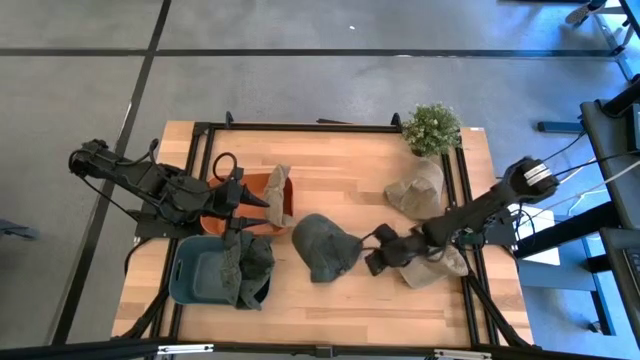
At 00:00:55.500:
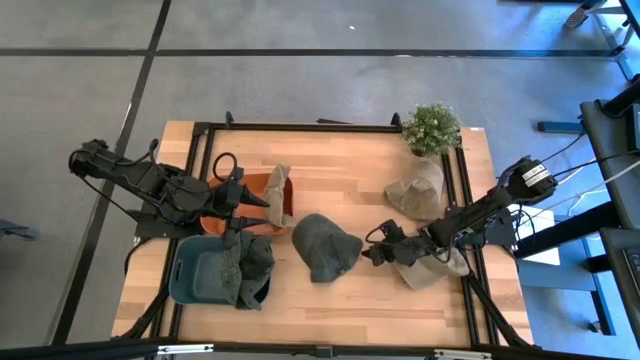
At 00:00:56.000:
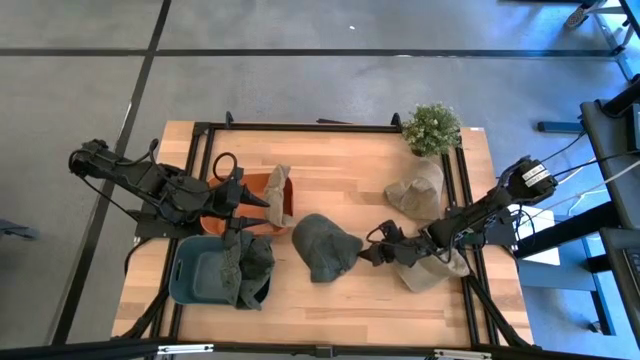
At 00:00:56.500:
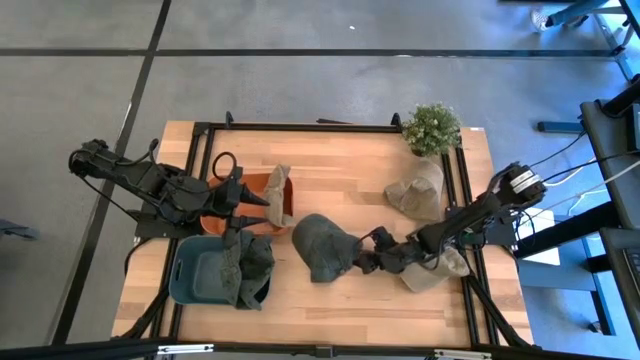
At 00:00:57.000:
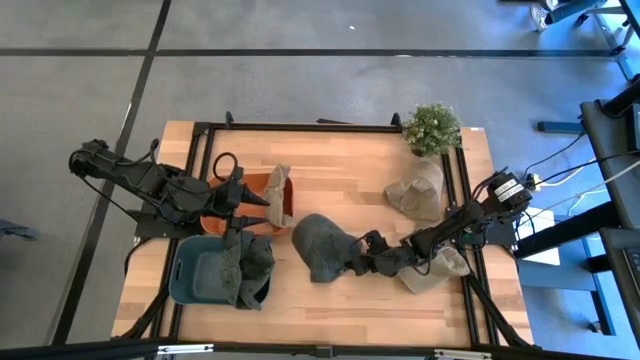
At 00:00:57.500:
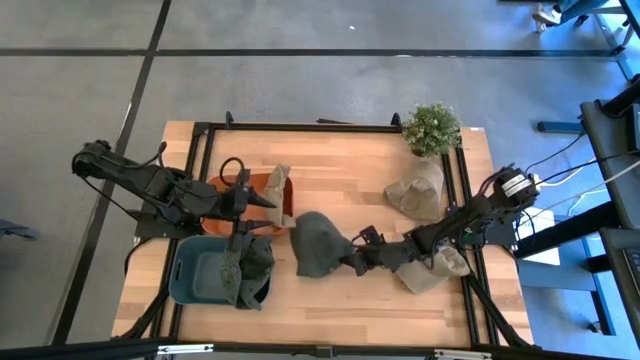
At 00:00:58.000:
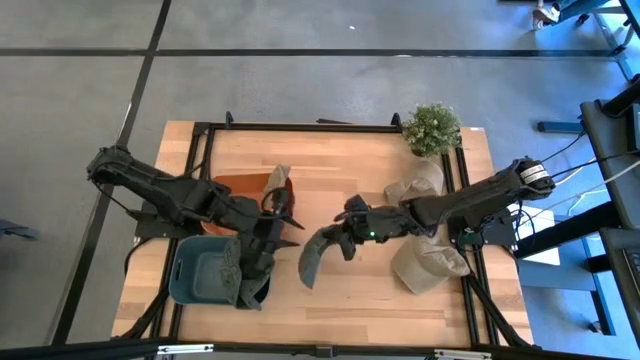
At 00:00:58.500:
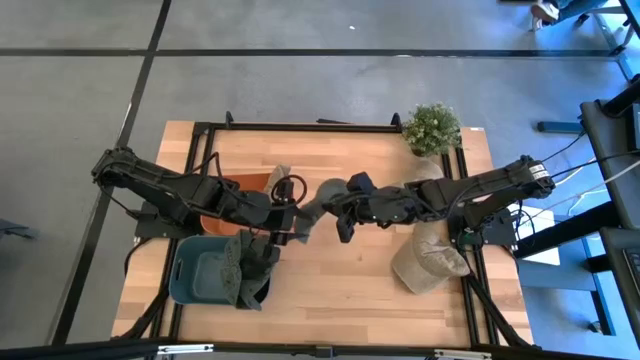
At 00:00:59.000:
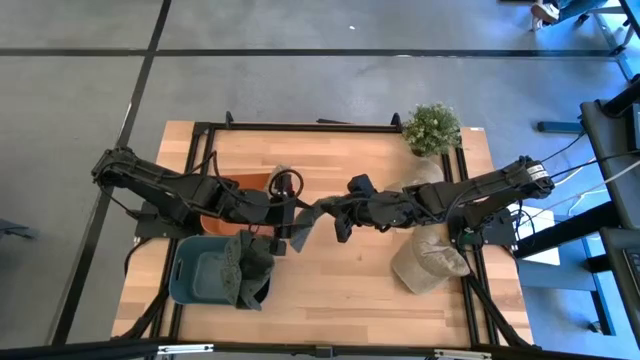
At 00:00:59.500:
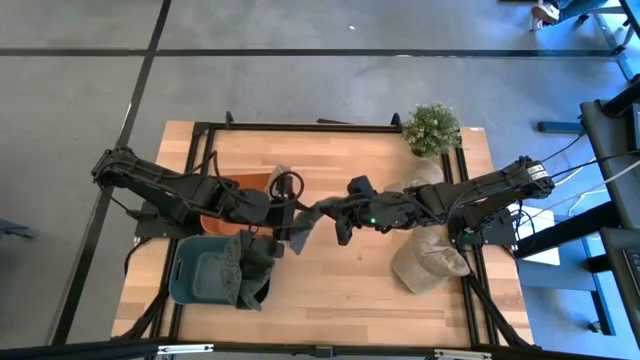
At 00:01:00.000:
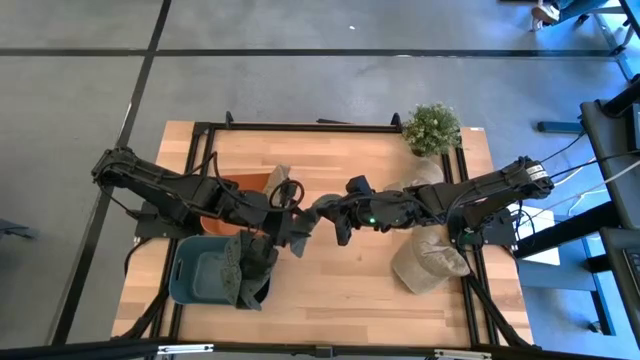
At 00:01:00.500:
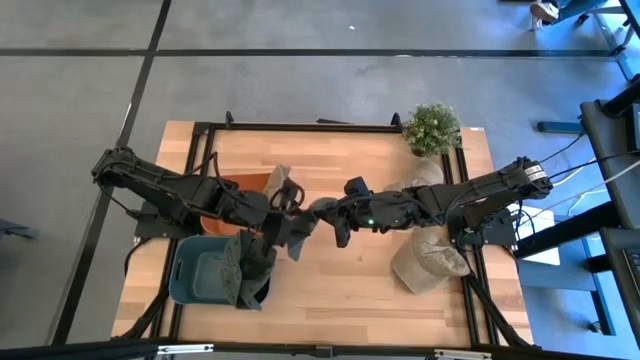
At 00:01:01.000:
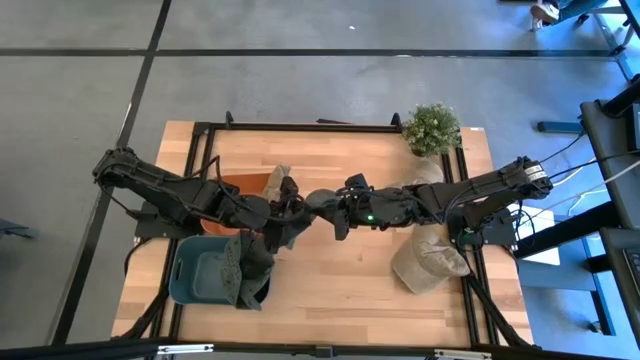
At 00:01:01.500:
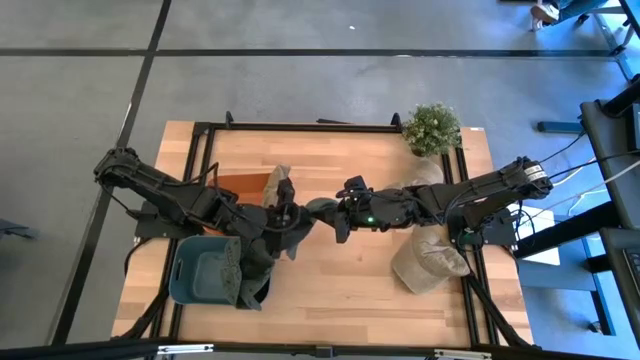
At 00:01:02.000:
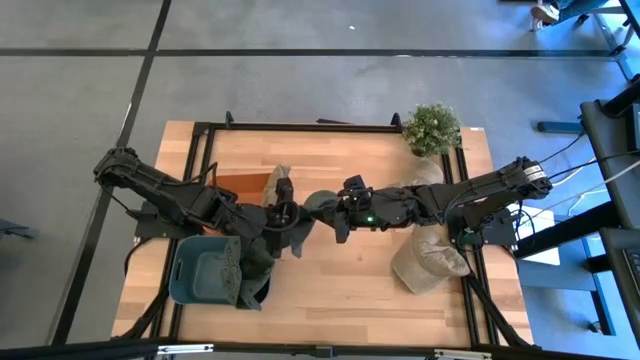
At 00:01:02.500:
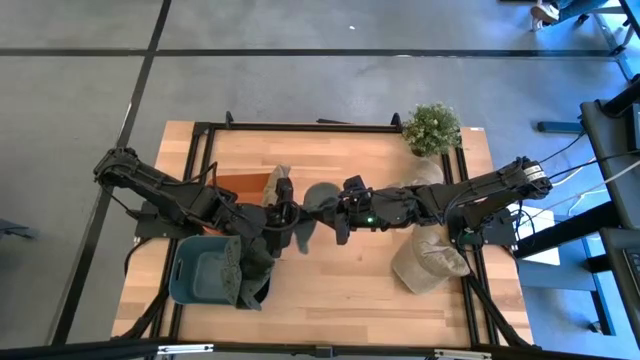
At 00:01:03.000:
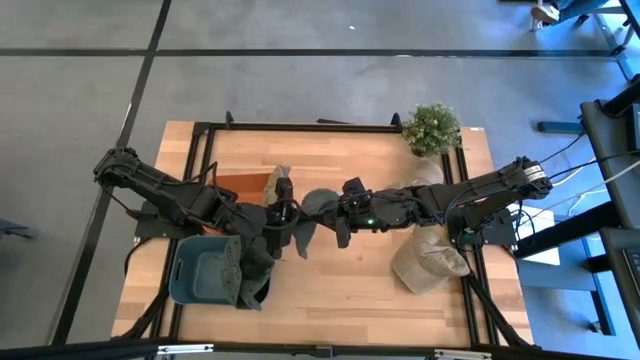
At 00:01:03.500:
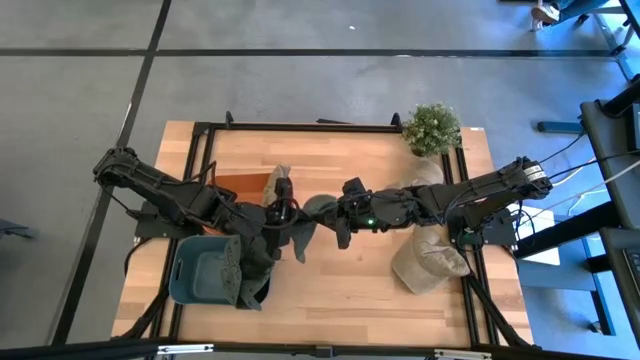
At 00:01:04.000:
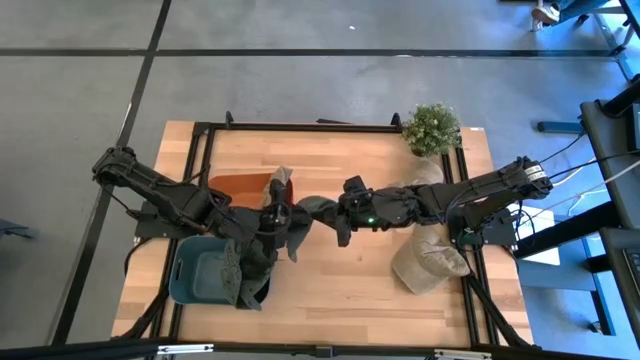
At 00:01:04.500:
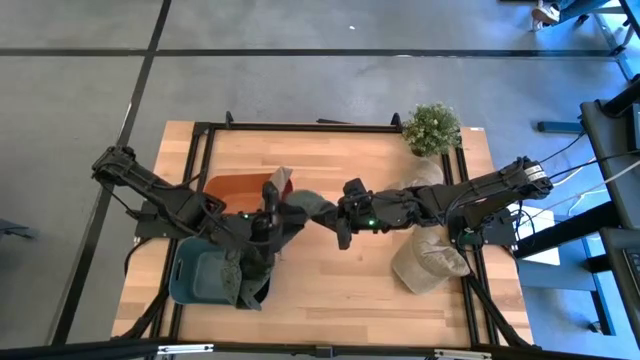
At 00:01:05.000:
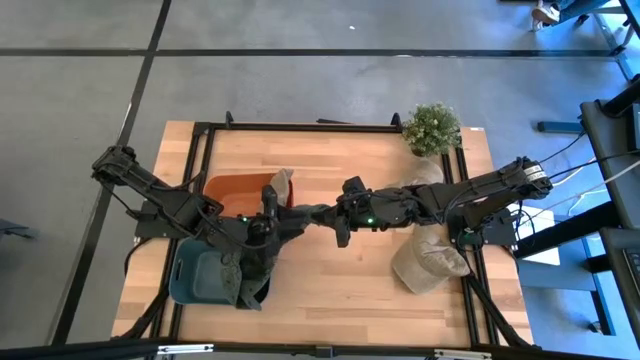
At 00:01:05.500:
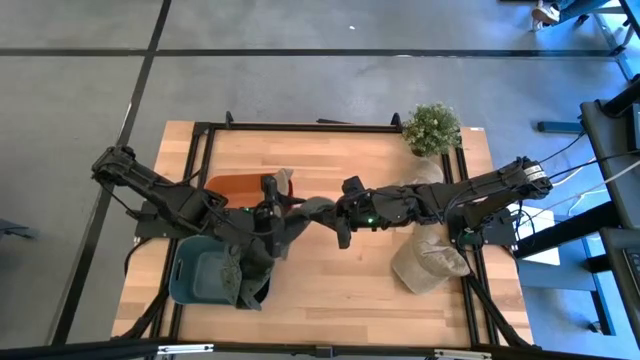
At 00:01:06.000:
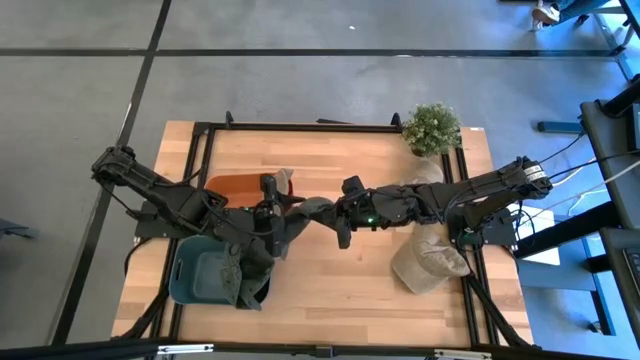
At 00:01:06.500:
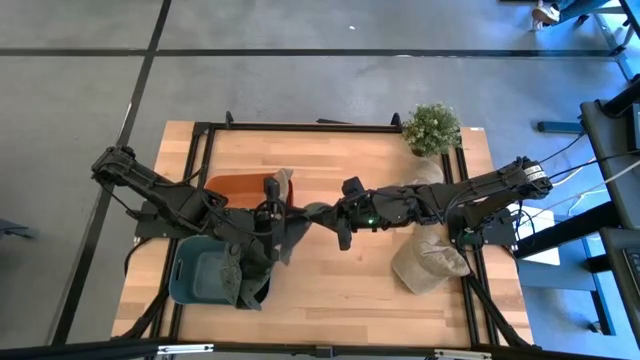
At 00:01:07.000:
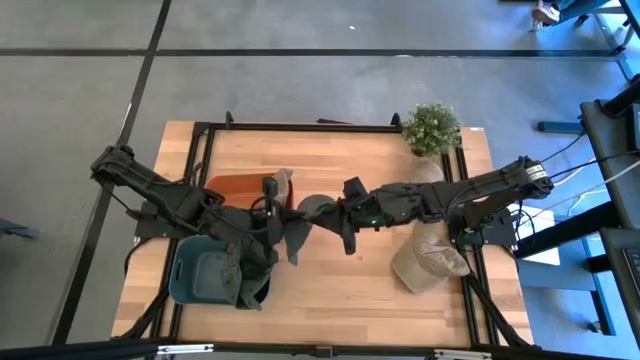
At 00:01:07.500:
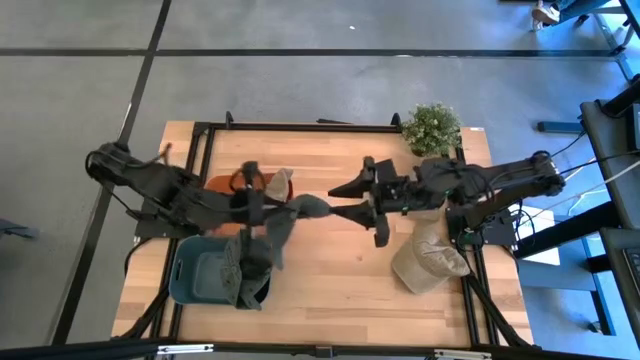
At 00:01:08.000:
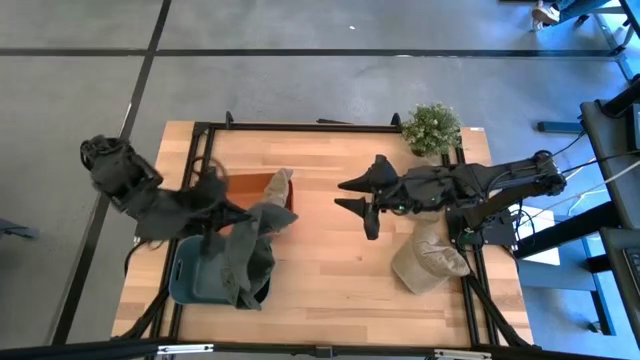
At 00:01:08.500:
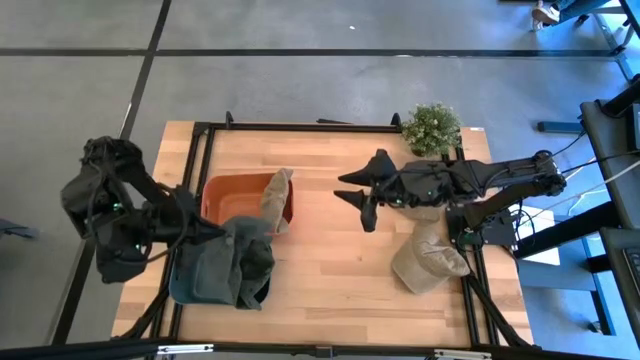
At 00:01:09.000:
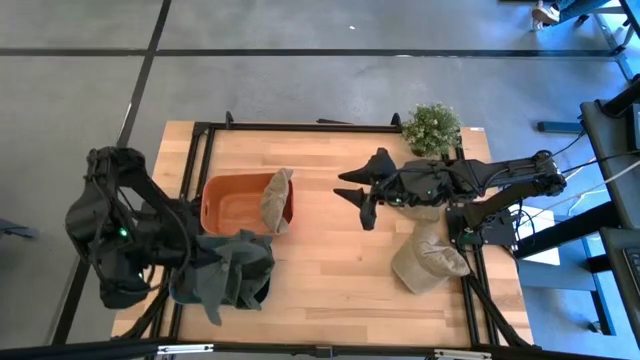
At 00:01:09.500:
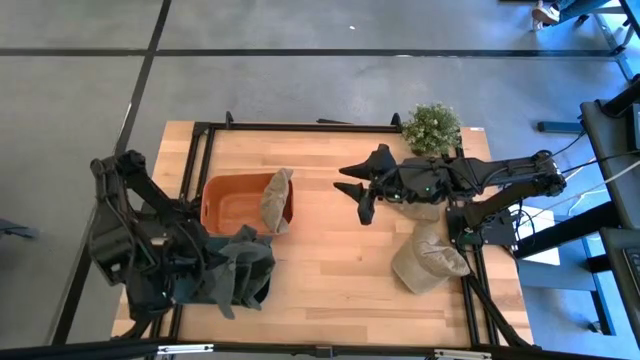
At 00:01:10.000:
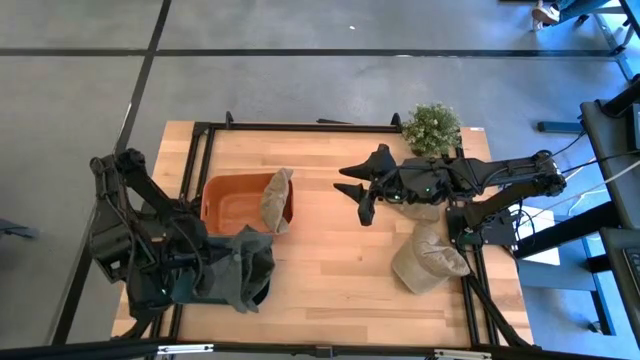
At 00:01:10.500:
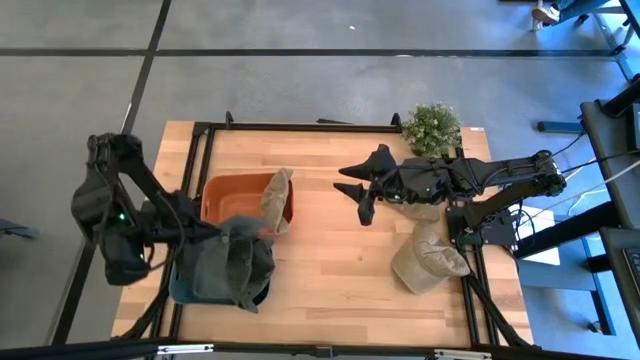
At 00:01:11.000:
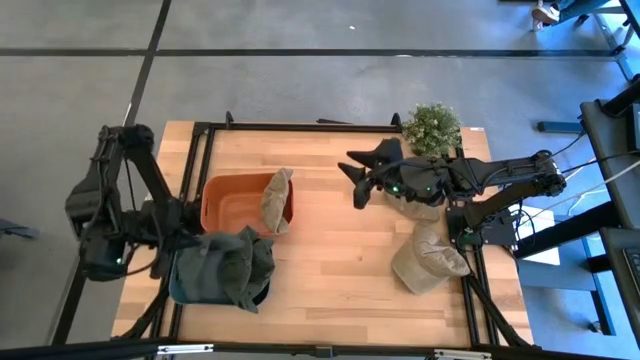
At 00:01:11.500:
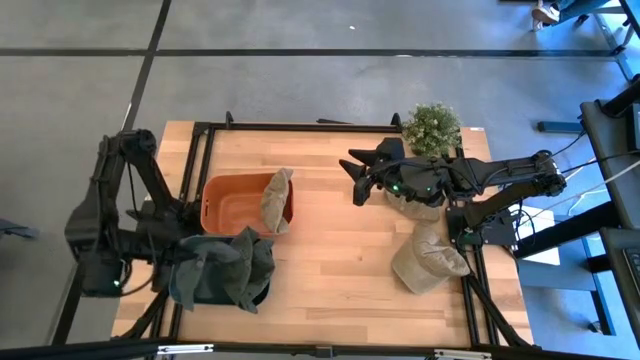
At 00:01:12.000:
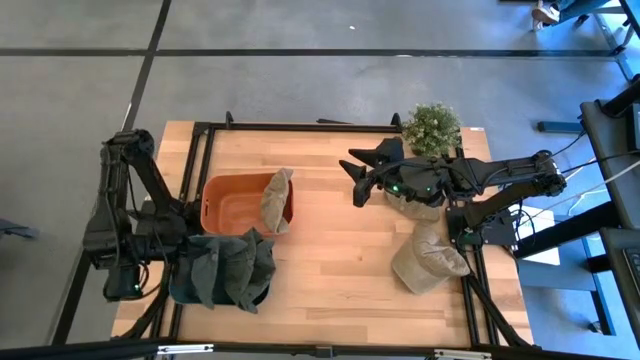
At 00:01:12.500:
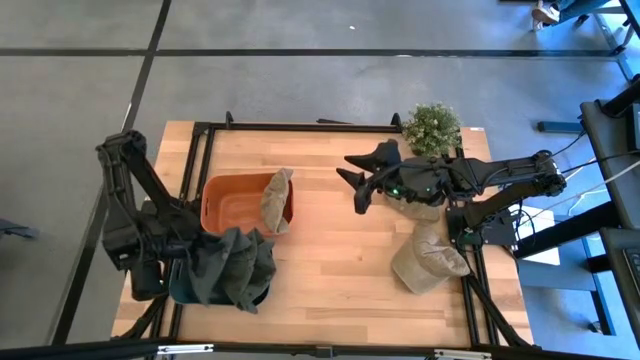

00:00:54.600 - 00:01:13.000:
Task: Pick & Place hat
Put the gray cap into the blue bin
